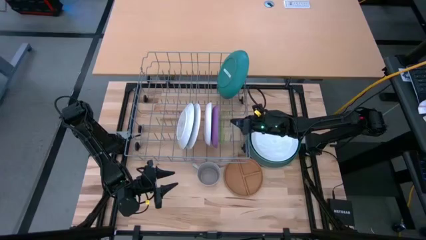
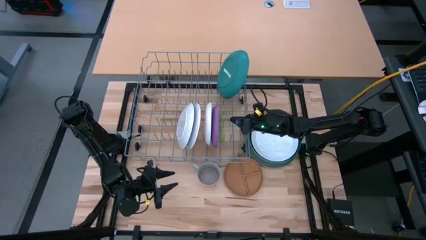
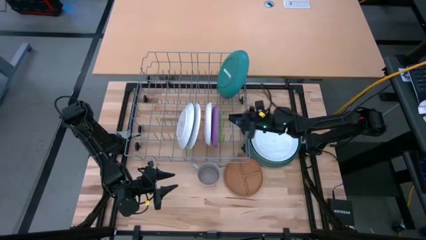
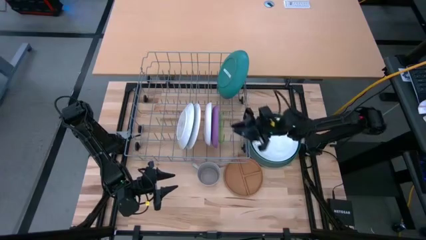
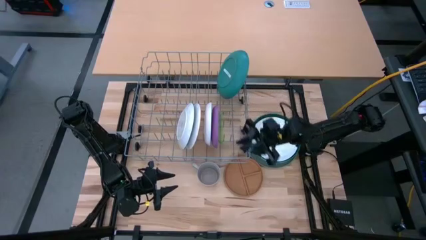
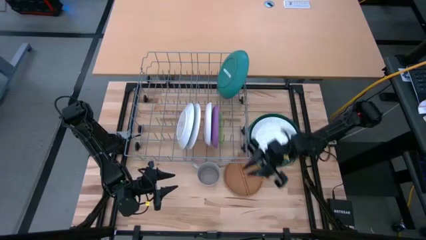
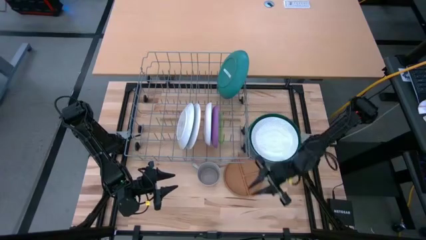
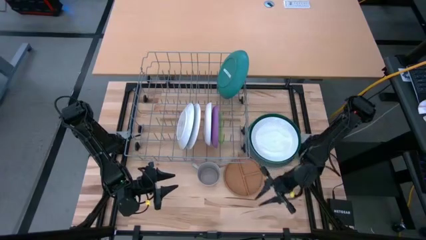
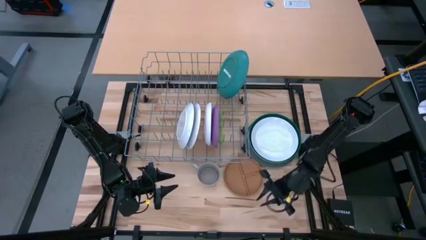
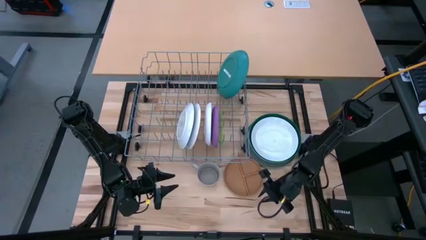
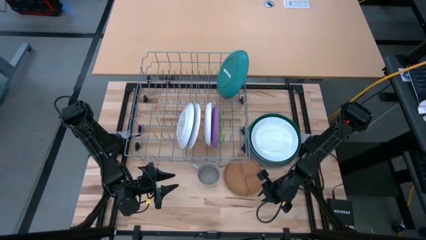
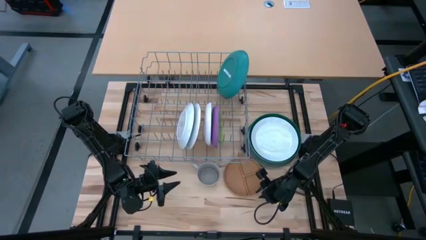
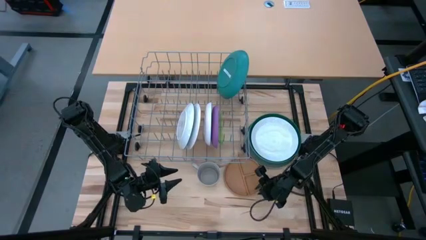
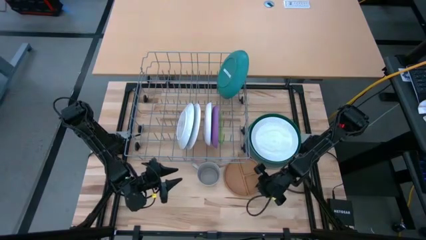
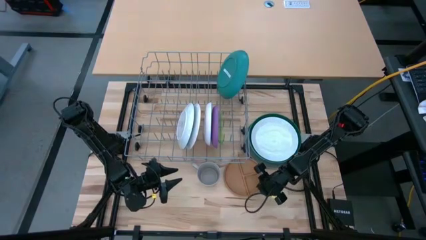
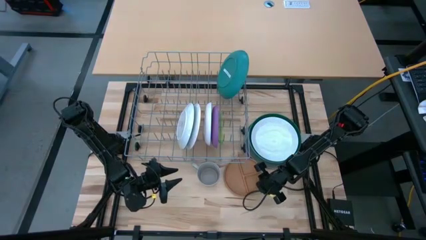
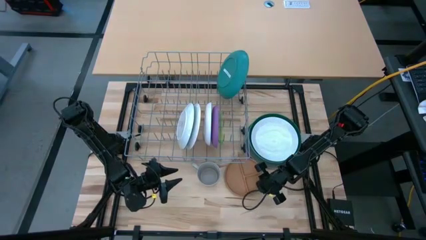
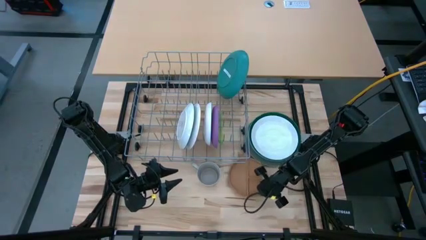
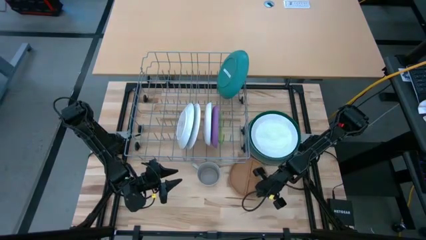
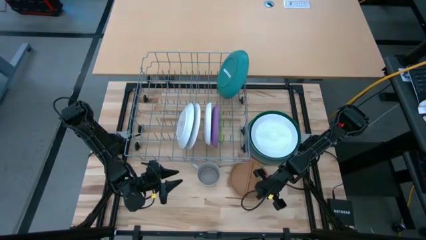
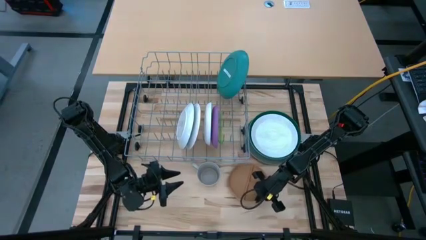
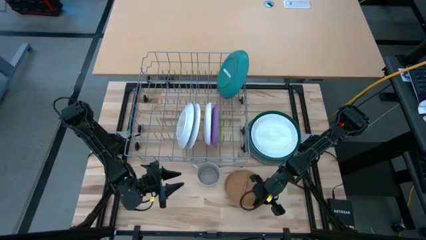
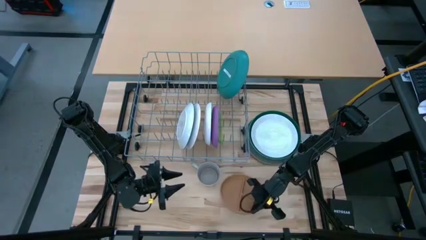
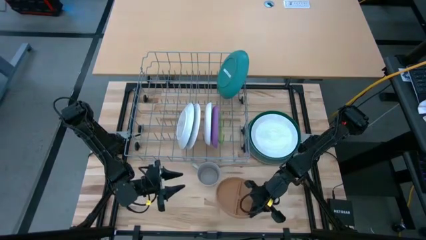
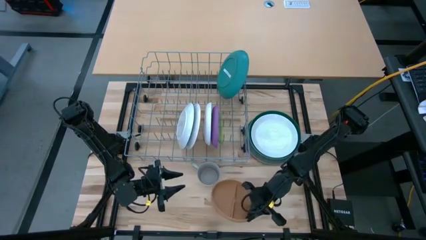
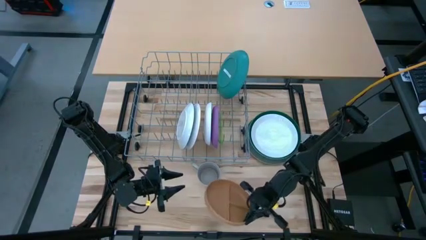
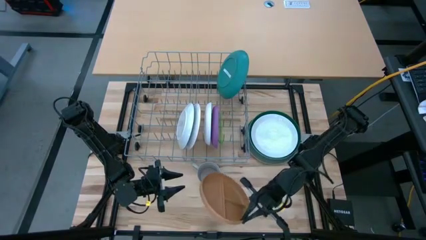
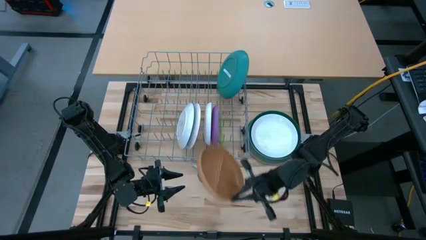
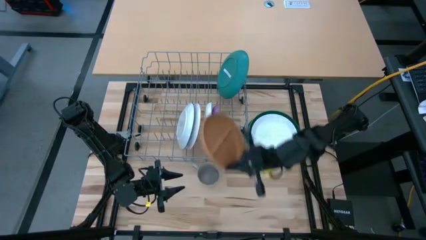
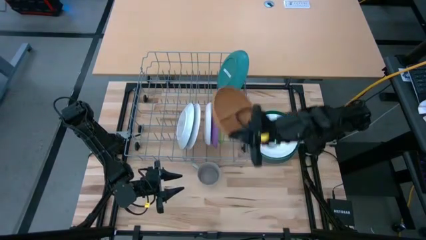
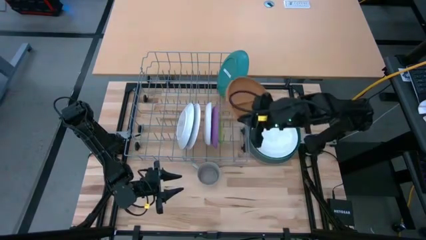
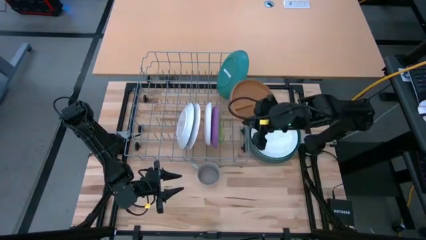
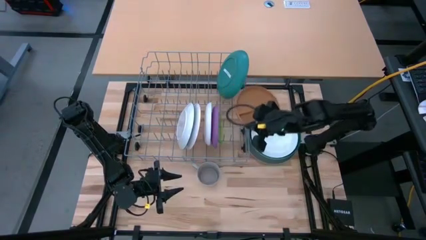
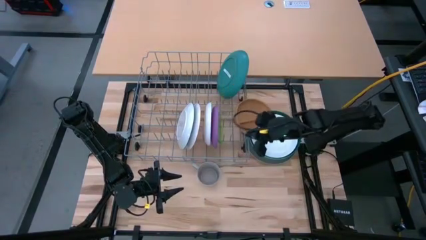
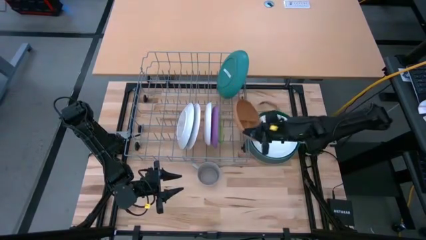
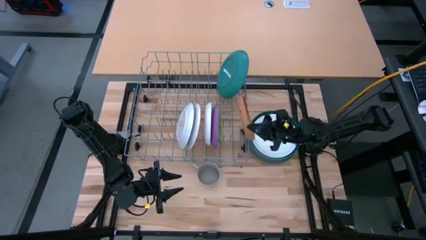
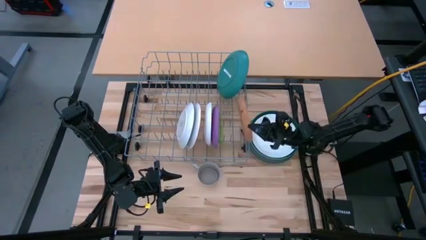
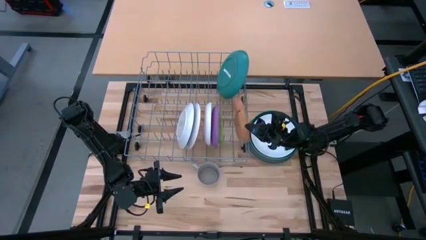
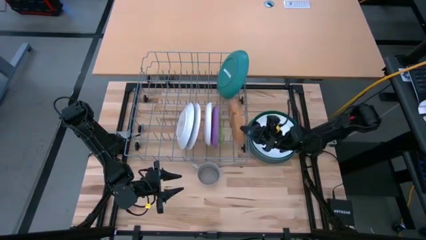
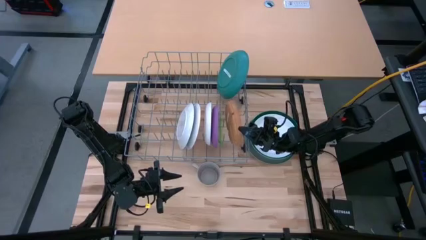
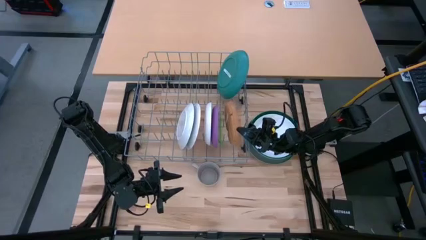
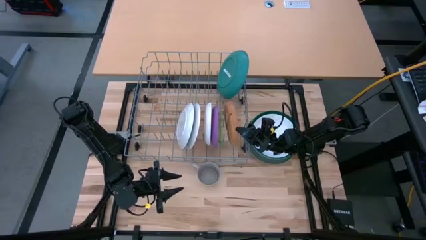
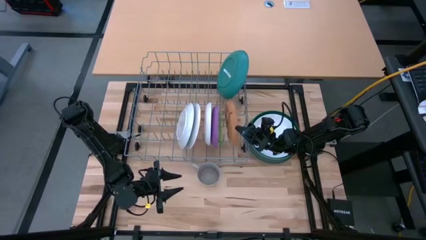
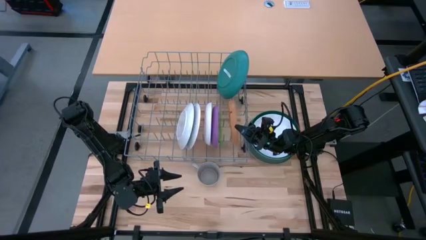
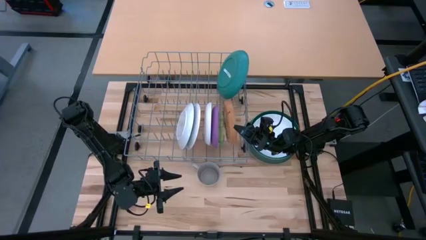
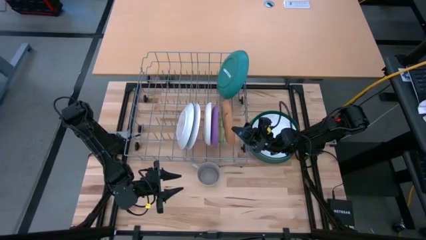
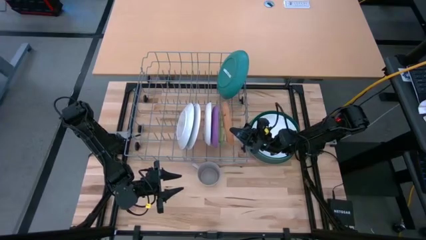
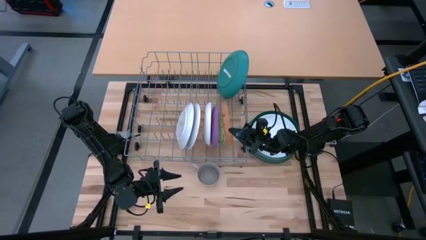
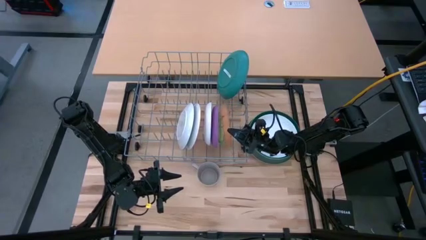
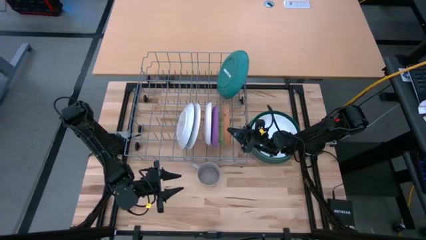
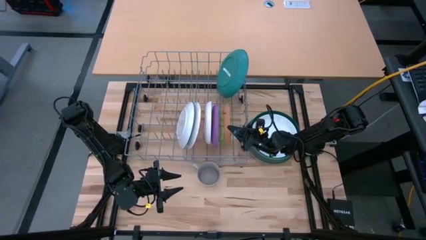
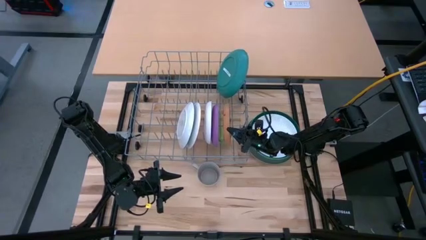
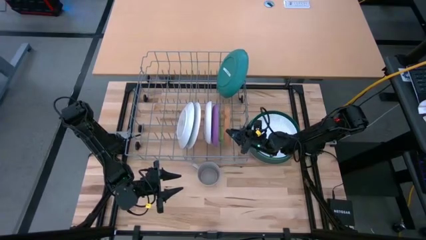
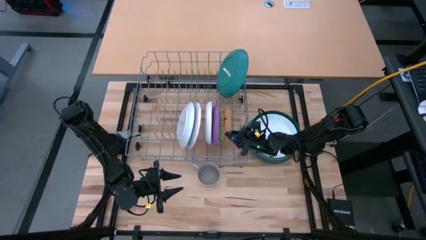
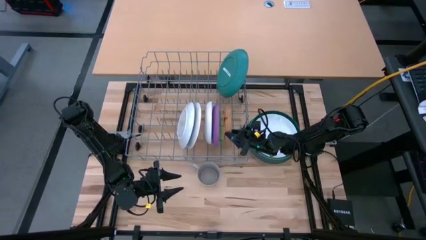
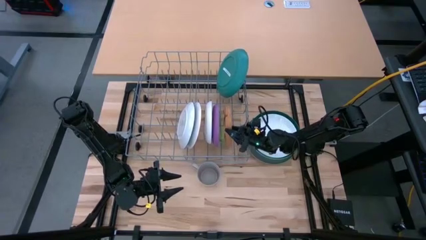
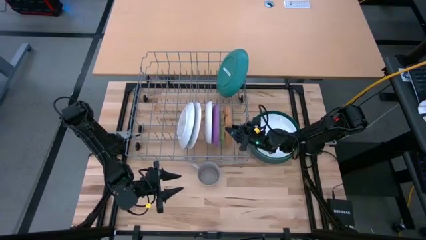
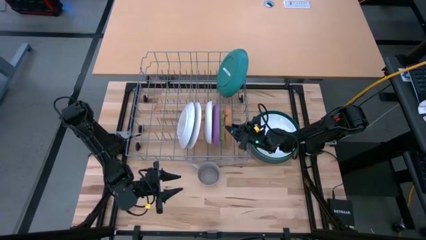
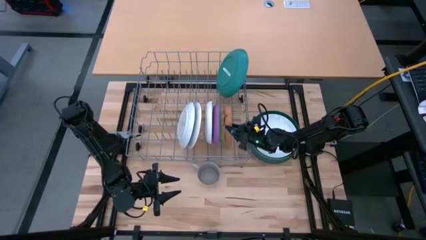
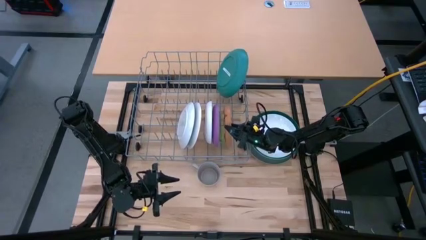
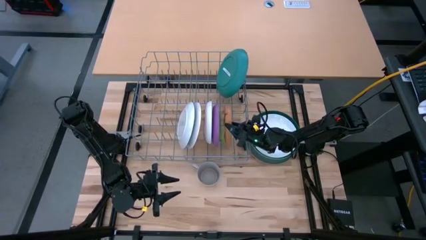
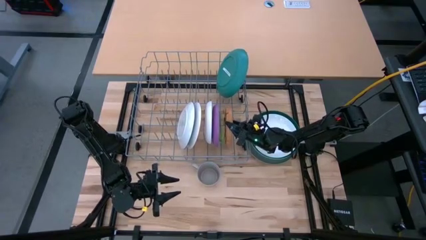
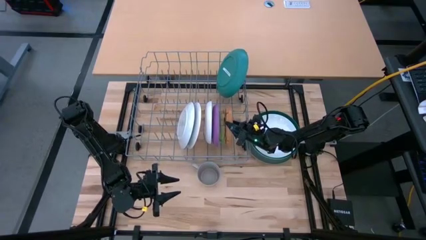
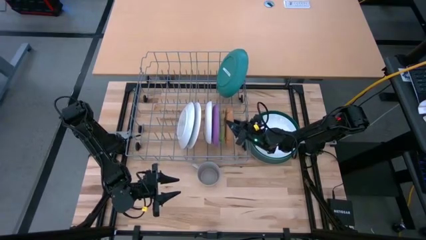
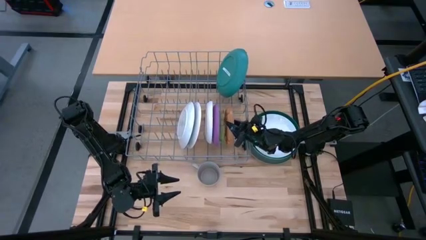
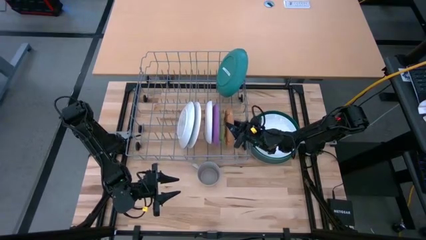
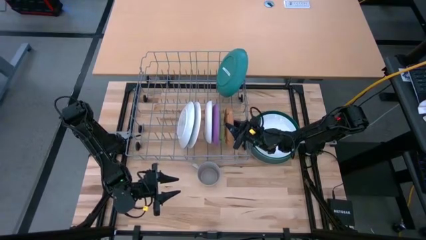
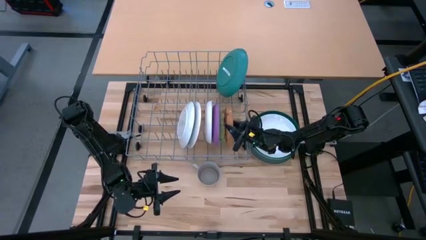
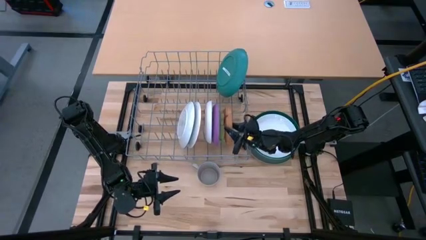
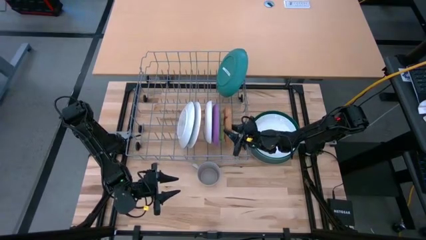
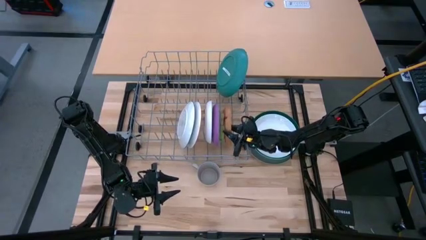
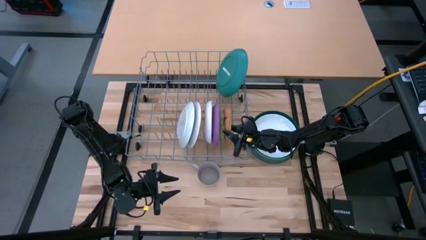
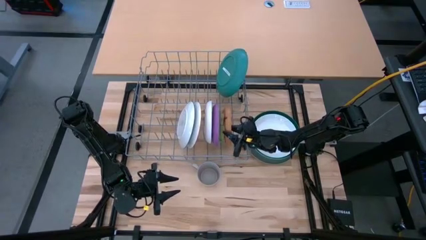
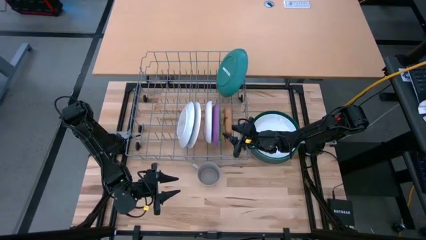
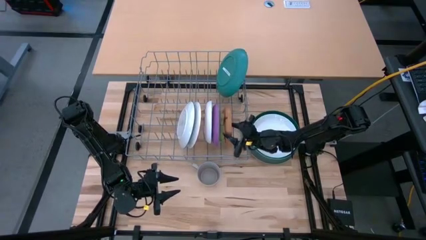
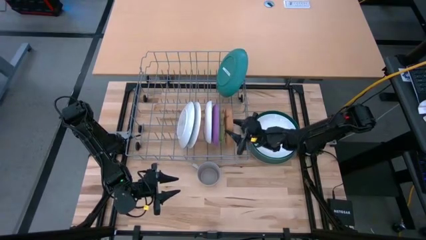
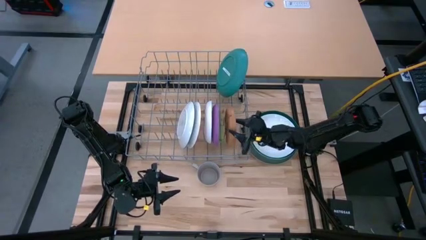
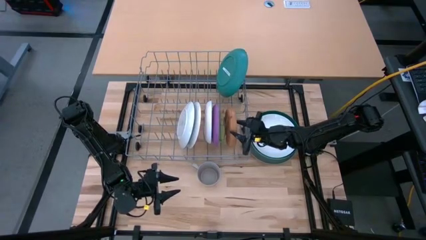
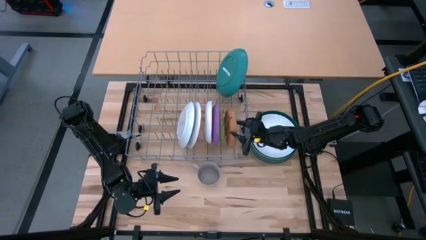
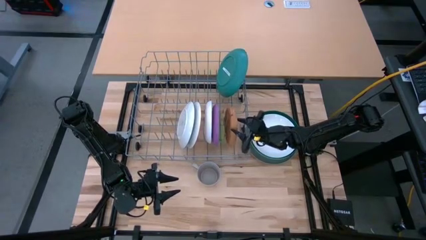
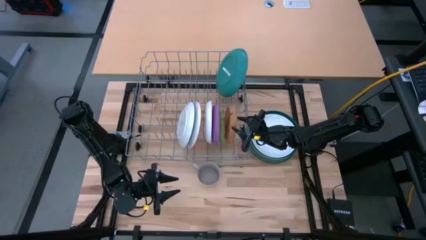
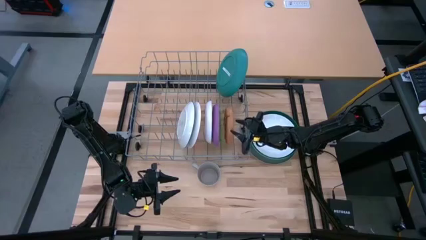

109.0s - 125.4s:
Task: Sort dishes
Put the brown plate in the dish rack
